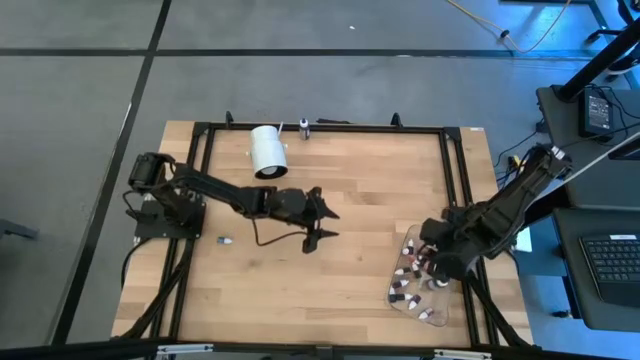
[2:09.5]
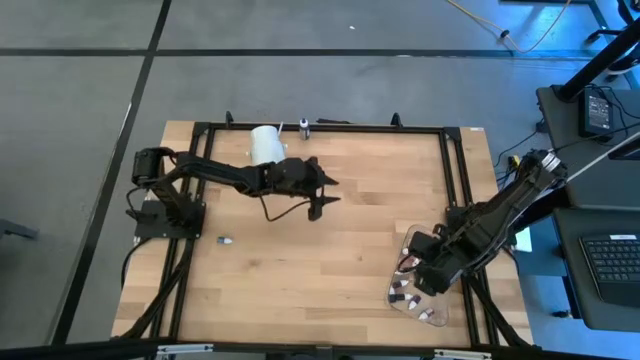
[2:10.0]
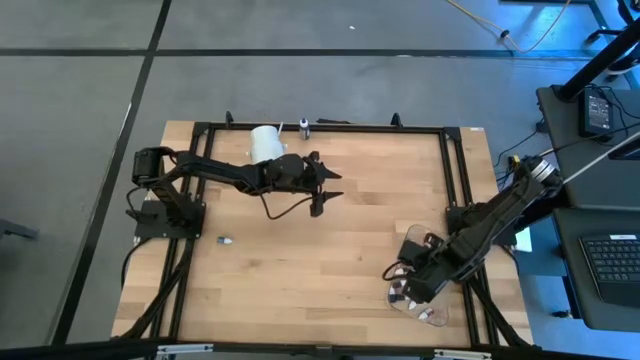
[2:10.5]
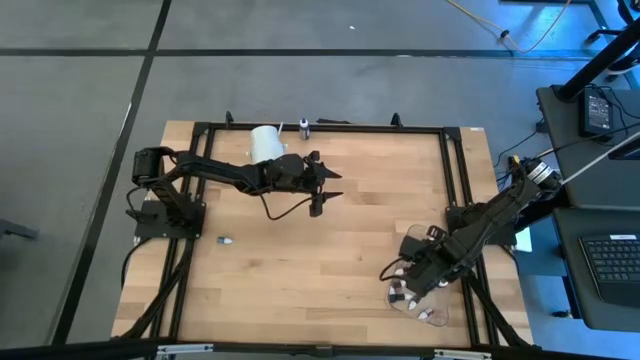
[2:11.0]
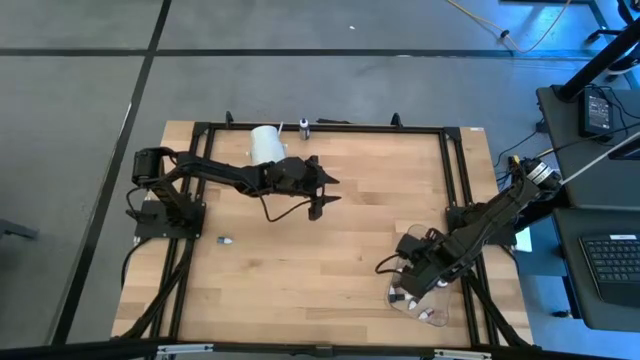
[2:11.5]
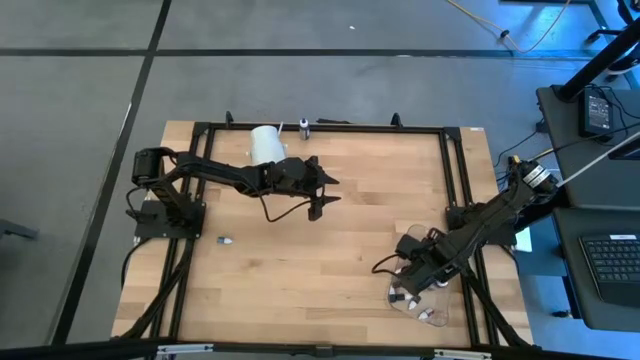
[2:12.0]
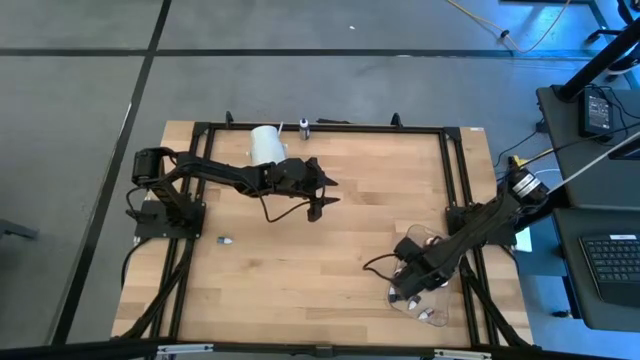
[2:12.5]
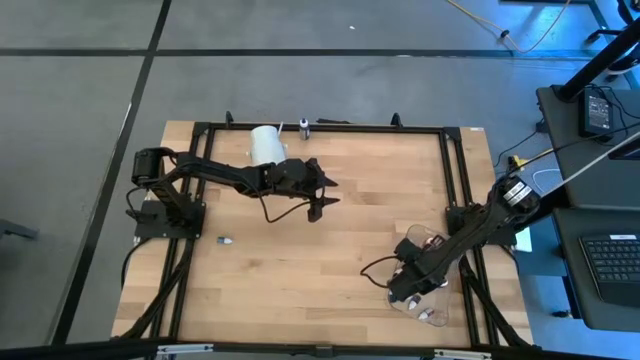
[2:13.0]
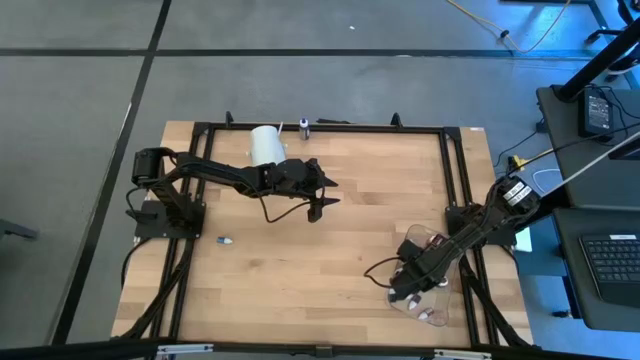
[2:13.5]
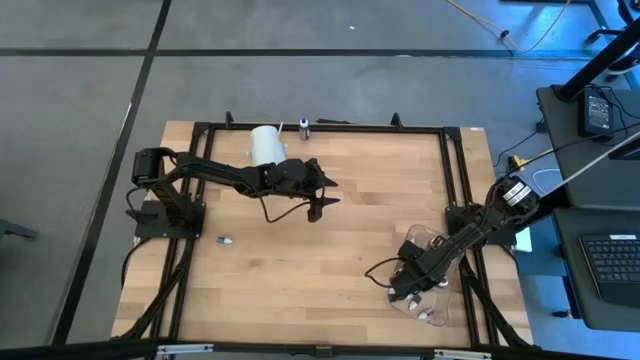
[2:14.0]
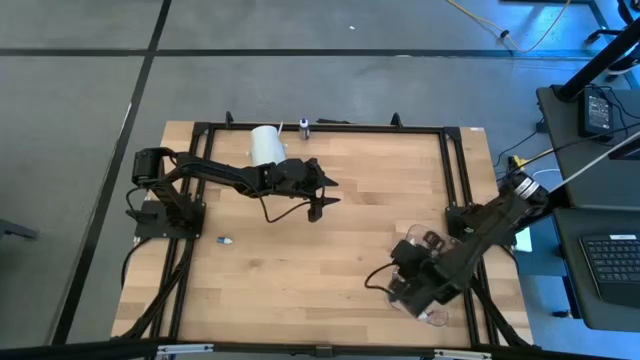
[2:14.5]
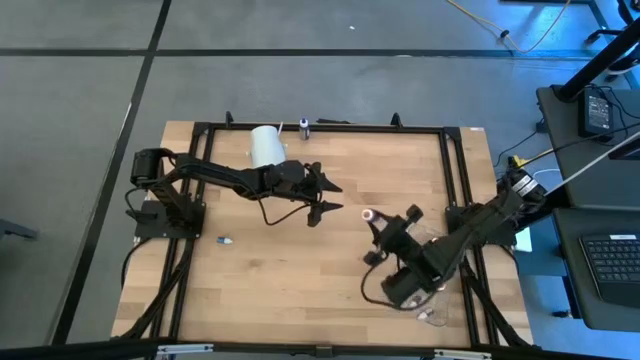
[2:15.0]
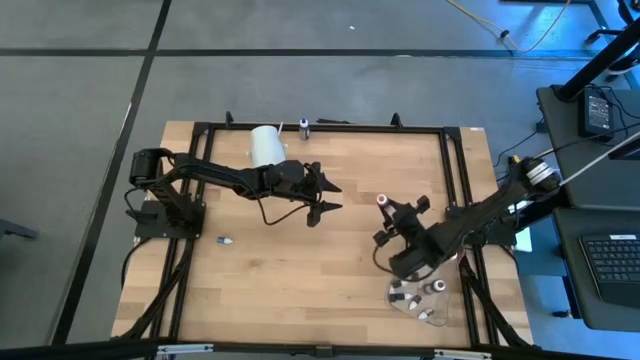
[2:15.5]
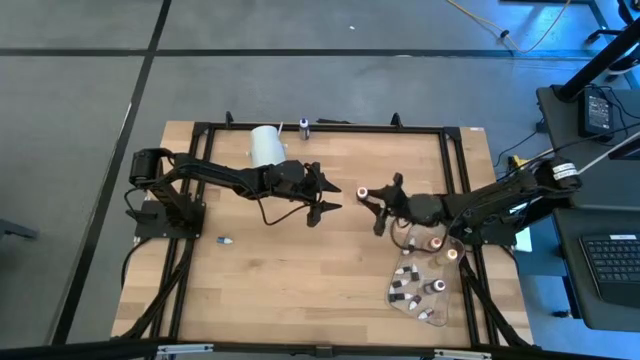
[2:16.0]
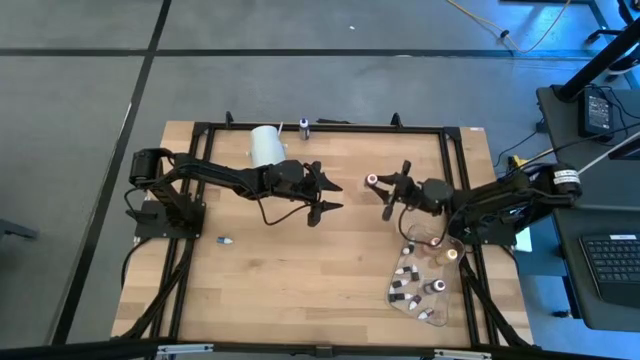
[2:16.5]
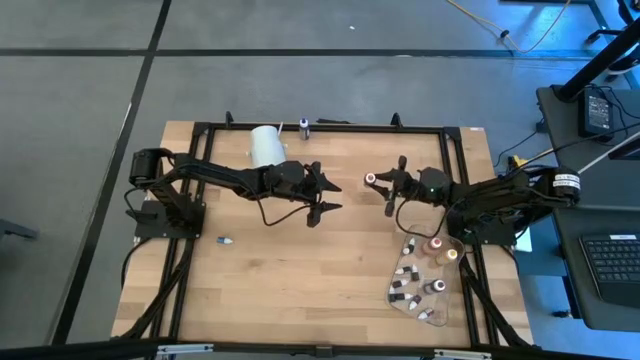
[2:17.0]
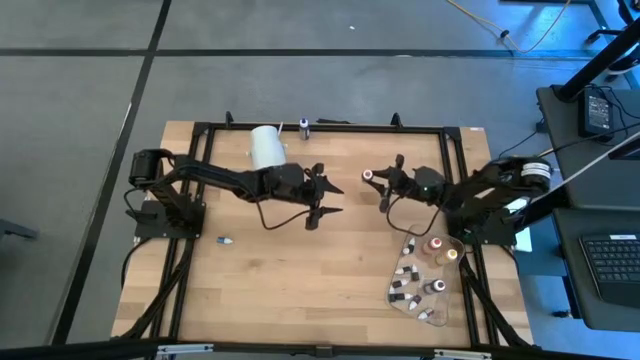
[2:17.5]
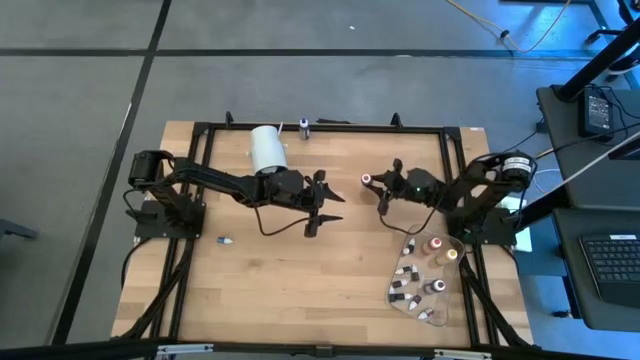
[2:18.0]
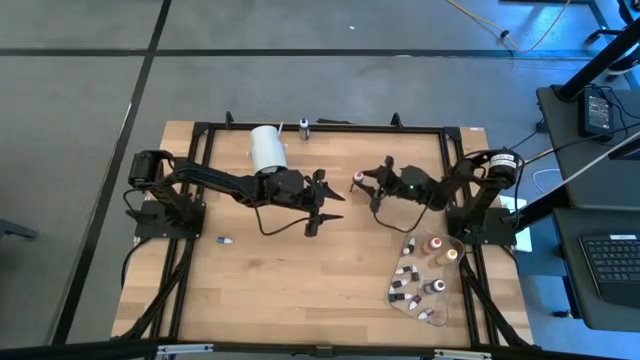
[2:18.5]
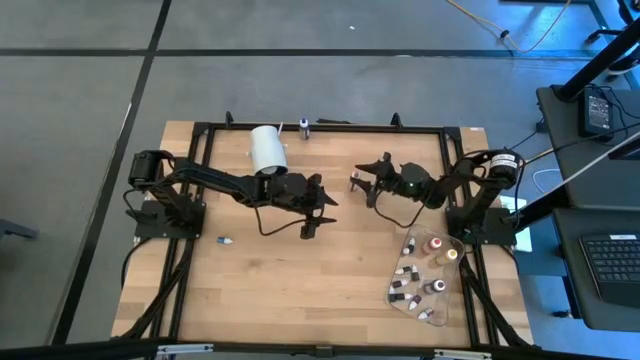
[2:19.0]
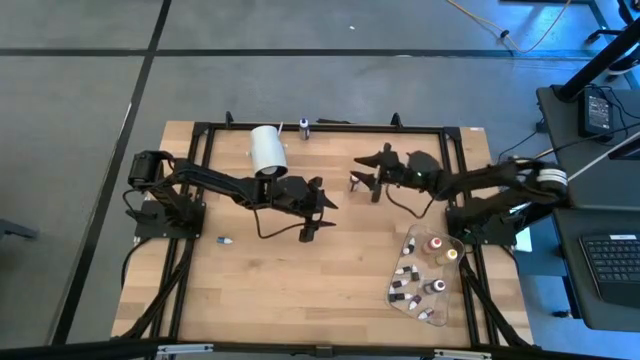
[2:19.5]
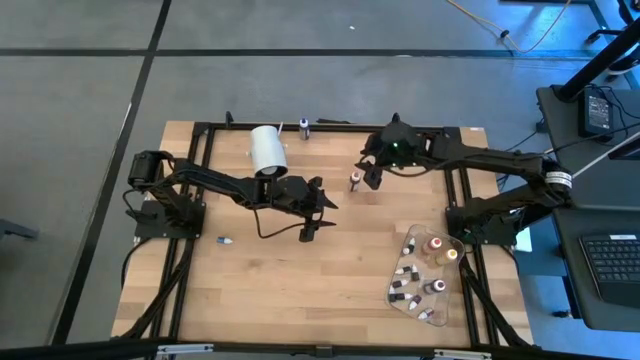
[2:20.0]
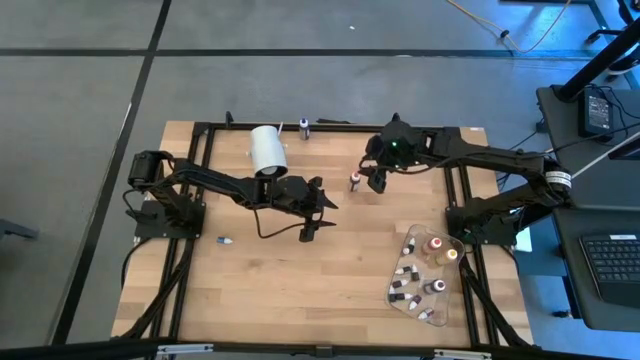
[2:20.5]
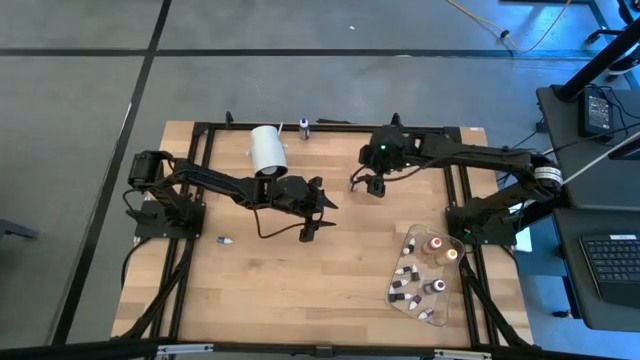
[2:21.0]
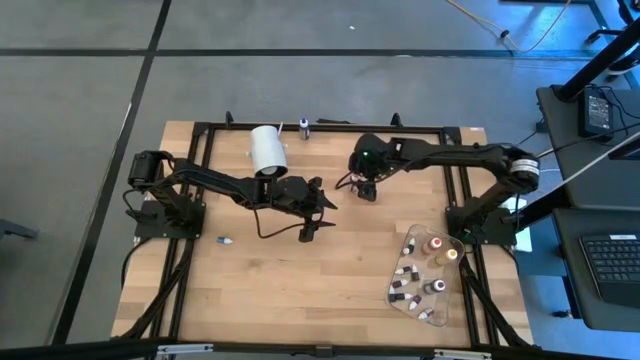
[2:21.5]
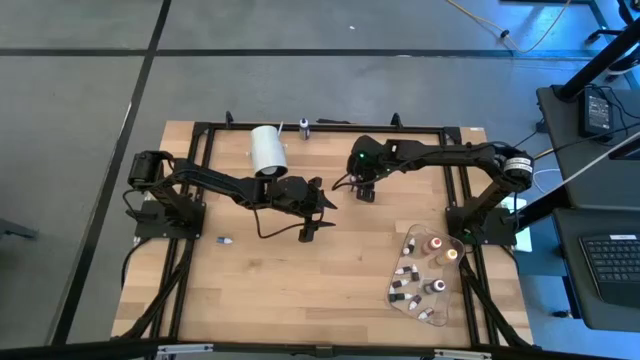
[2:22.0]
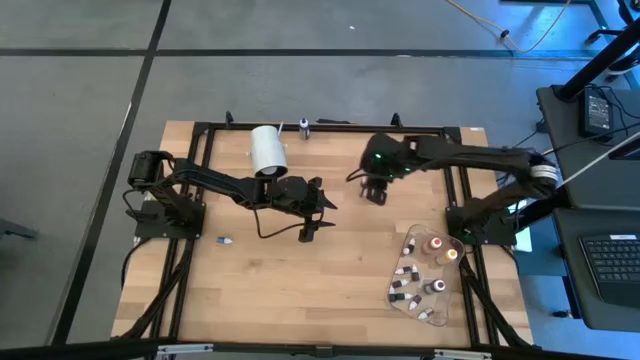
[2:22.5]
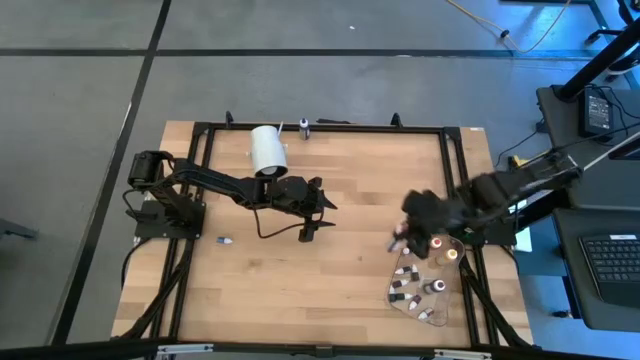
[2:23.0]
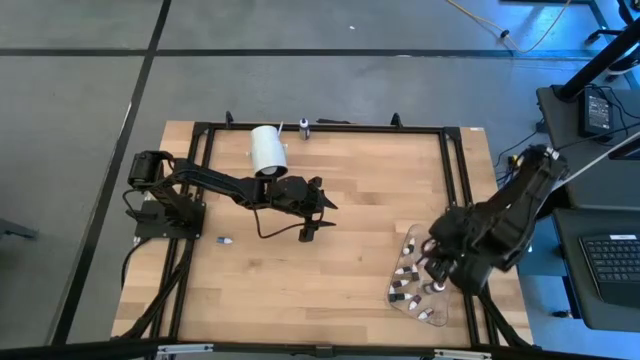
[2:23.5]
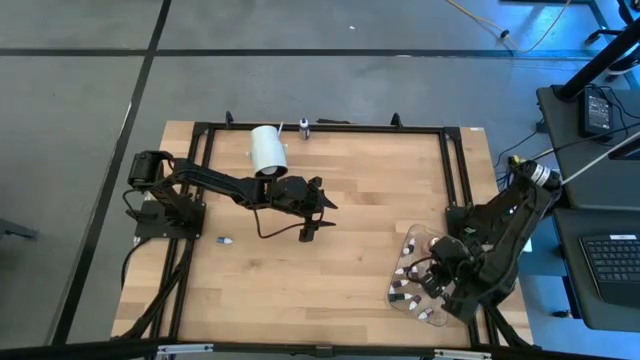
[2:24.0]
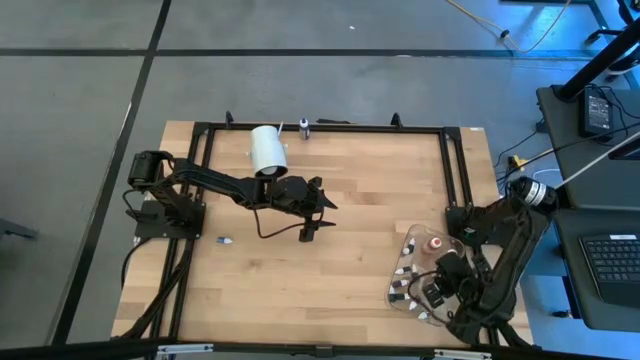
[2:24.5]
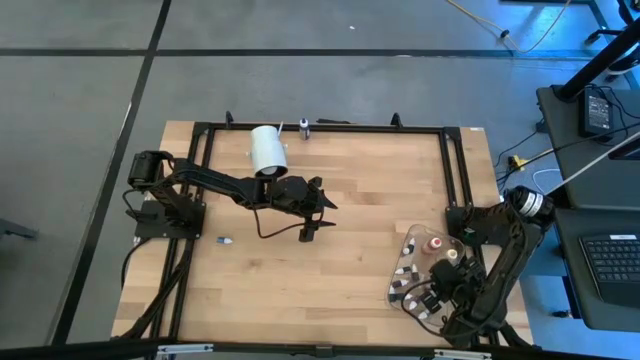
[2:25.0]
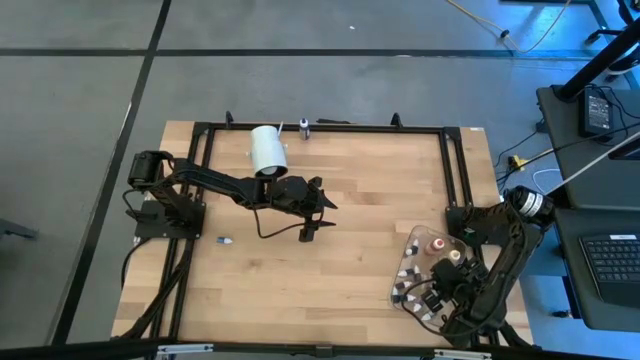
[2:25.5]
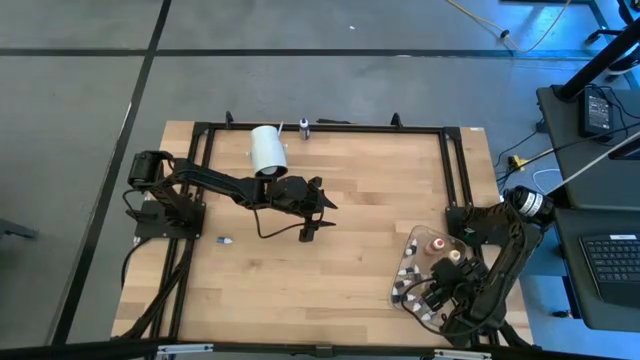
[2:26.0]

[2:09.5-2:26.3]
Task: Pick & Place food coloring
Put the large pink food coloring bottle into the transparent bin

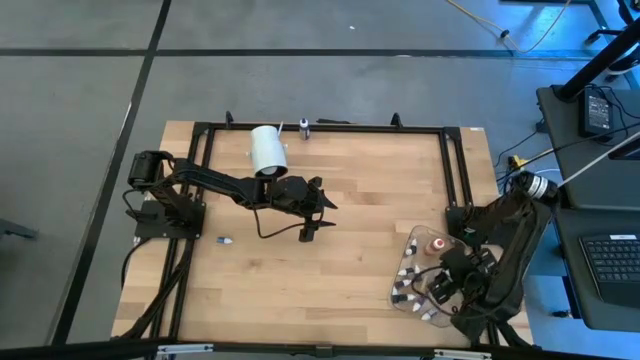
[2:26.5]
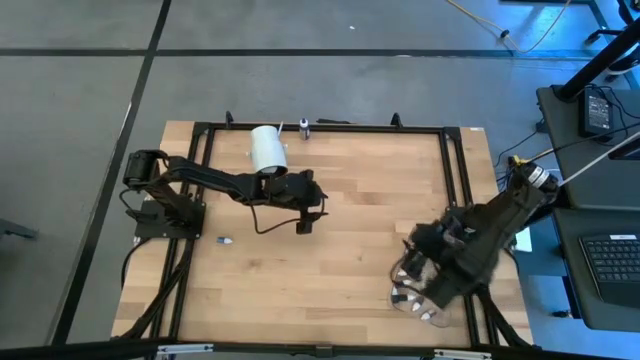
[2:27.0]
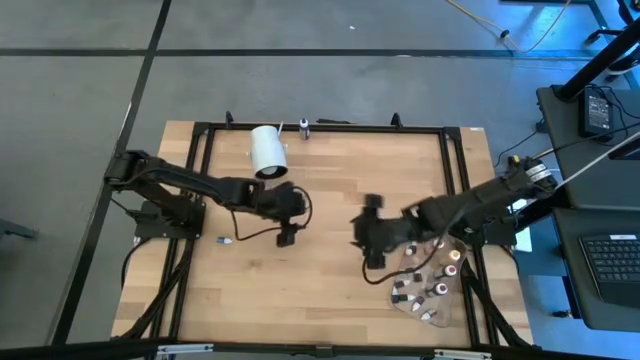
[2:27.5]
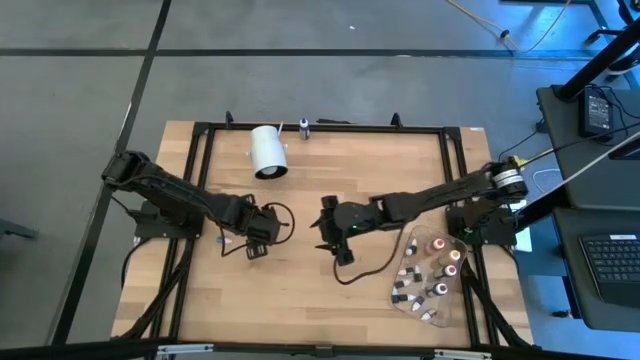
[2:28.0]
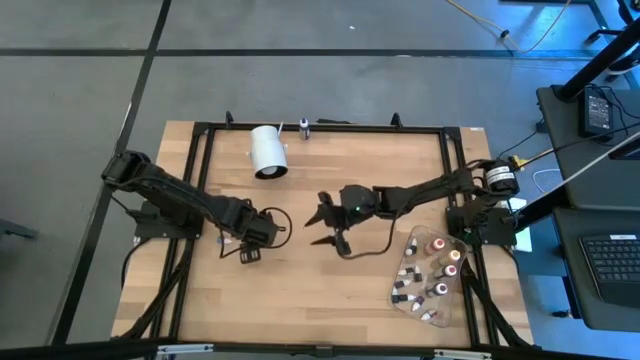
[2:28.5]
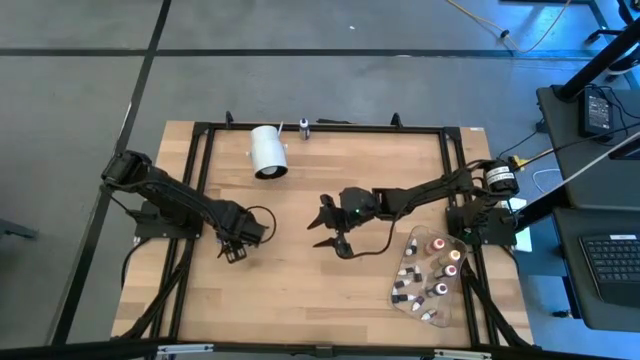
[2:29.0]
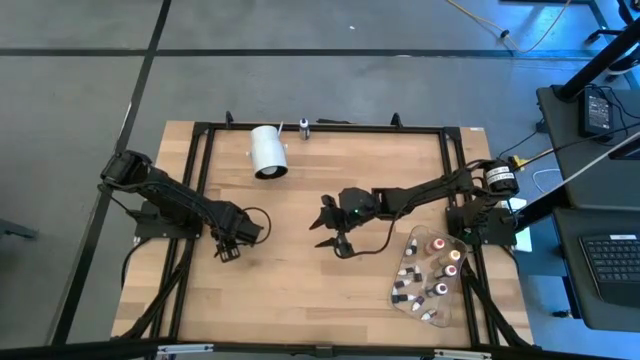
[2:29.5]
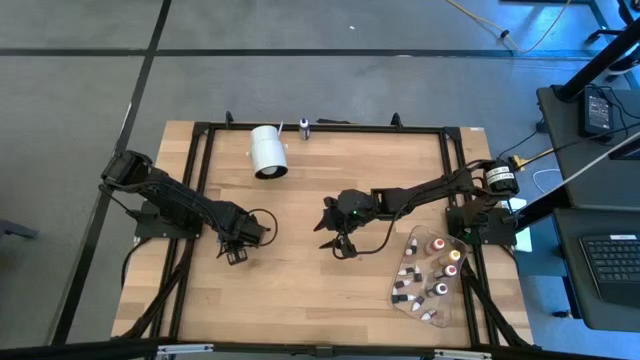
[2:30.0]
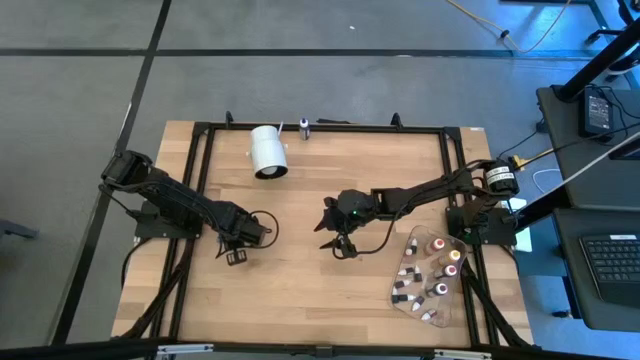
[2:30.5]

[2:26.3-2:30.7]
Put the small blue food coloring bottle into the transparent bin

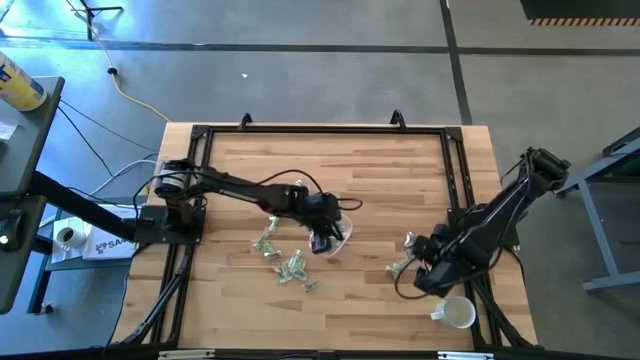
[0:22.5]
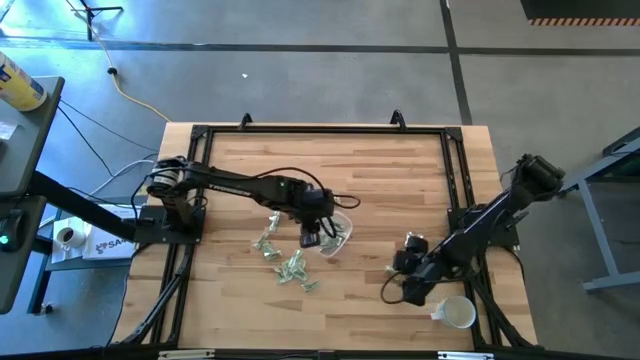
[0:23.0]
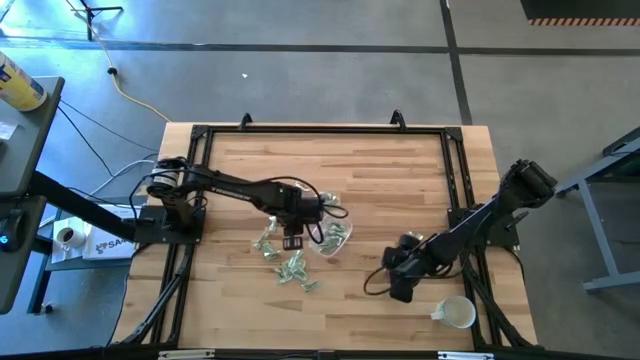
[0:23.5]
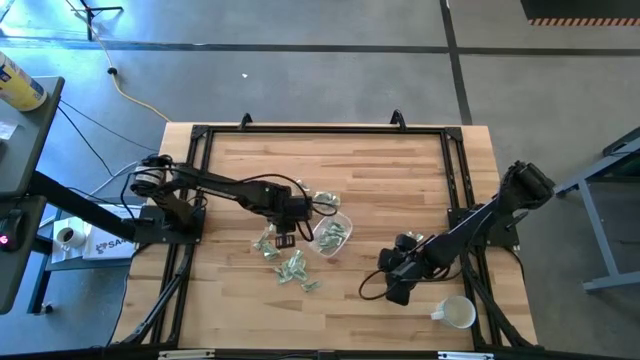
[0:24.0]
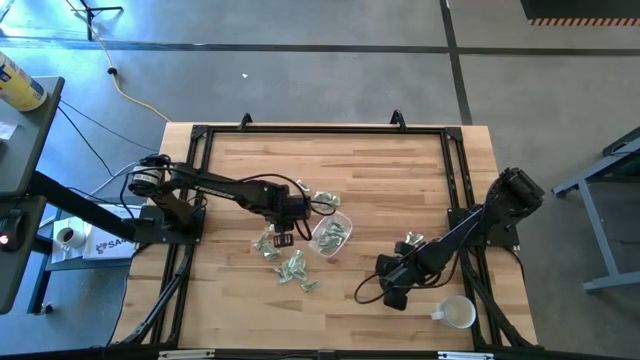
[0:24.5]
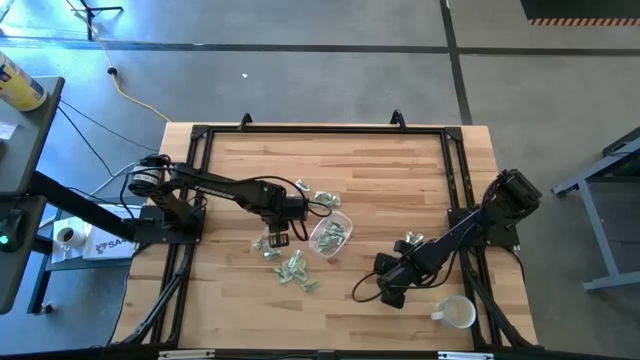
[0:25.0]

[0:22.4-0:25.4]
Task: Pick and place Stevia / Truvia into bins
Put the stevia packet into the transparent bin
